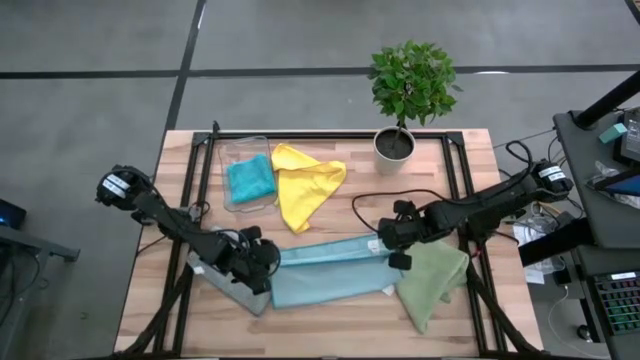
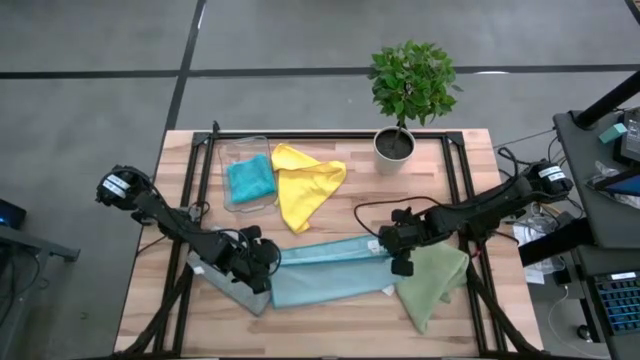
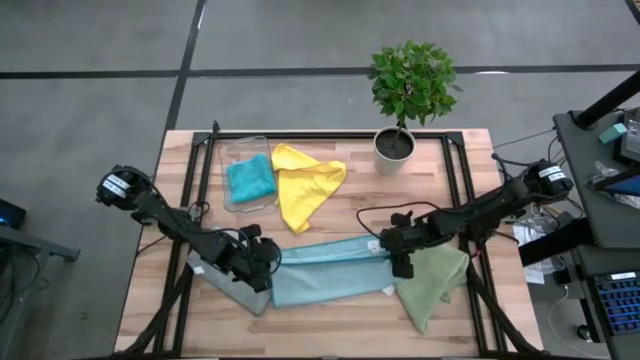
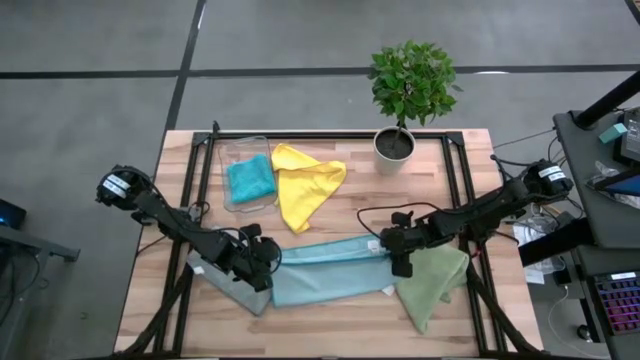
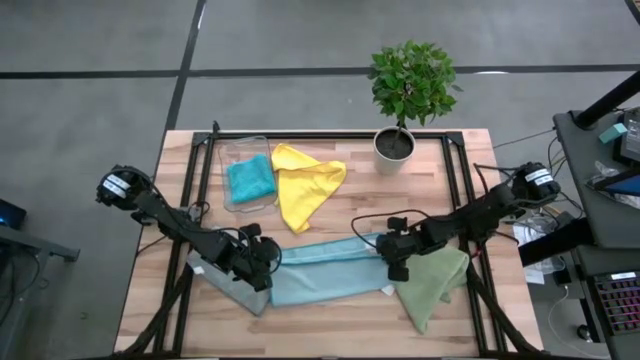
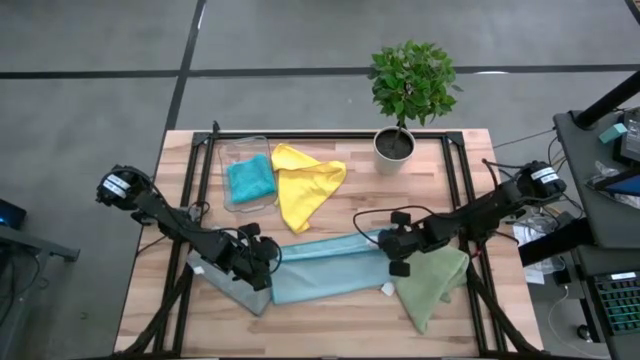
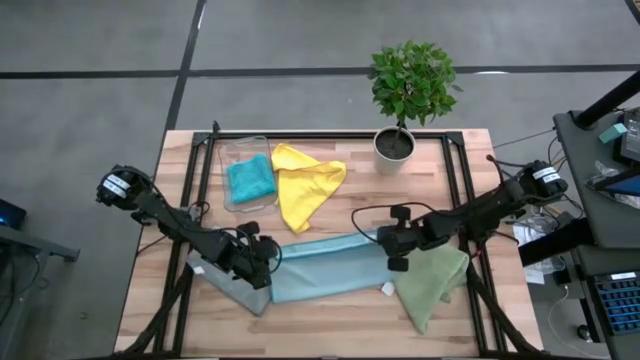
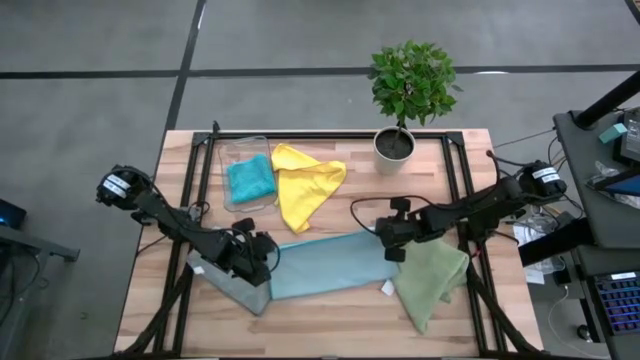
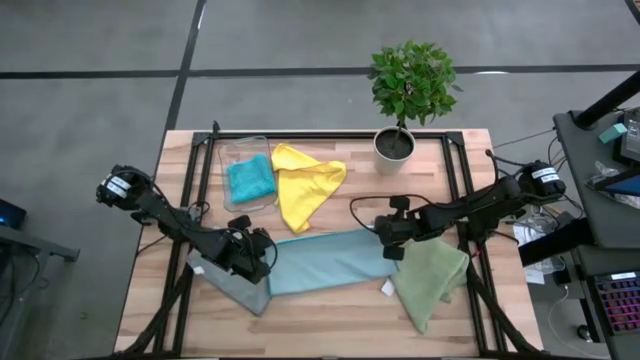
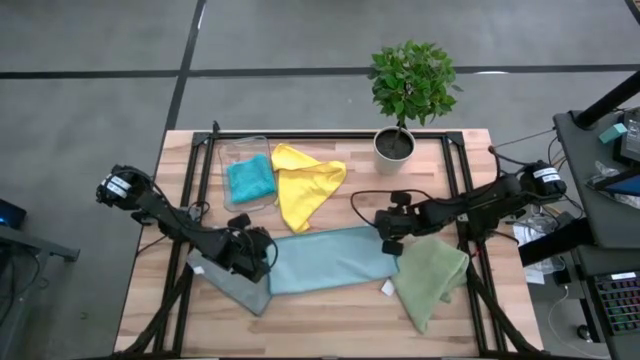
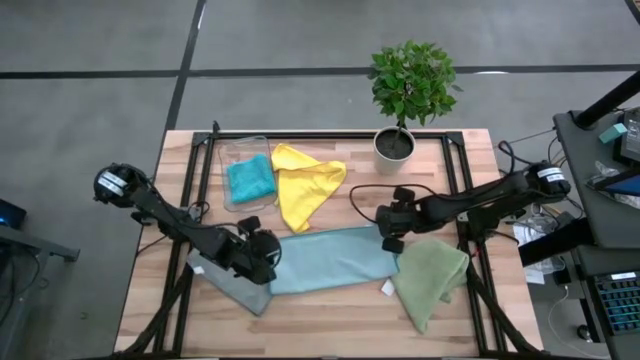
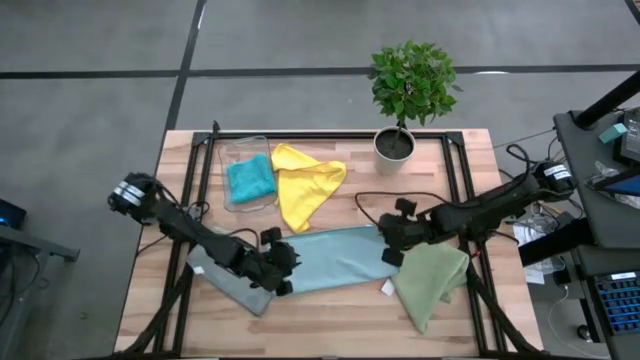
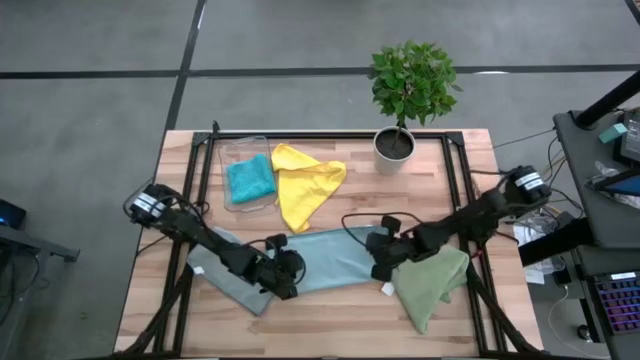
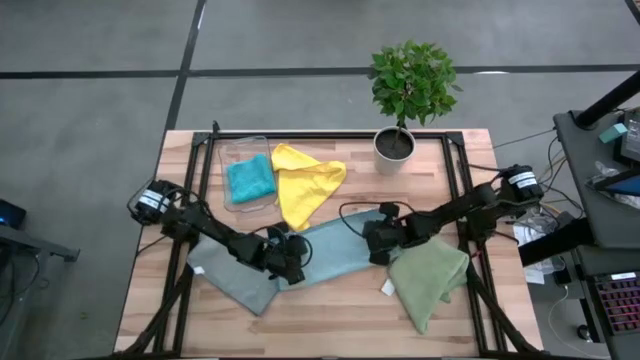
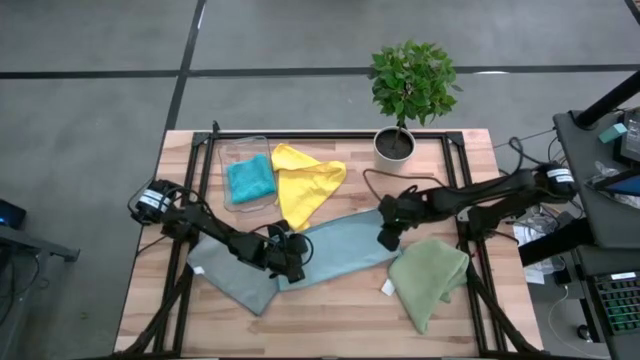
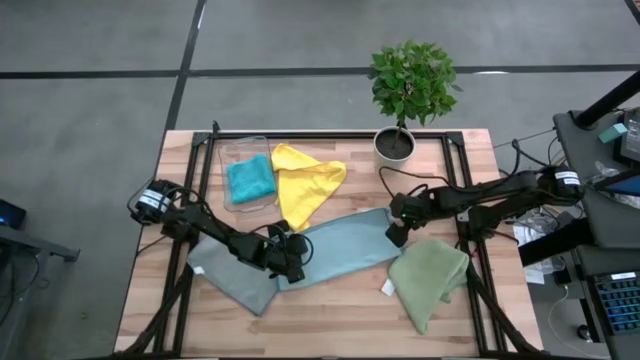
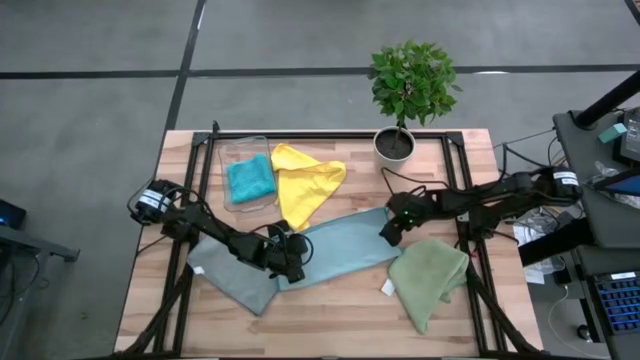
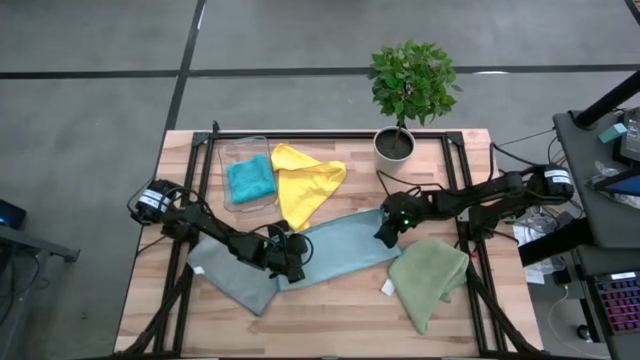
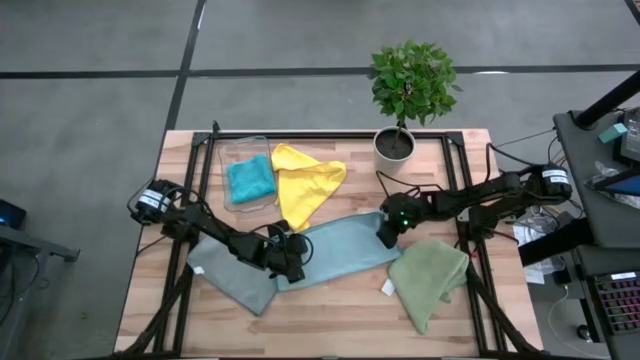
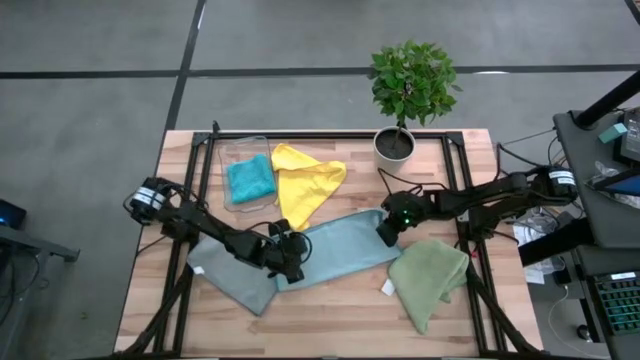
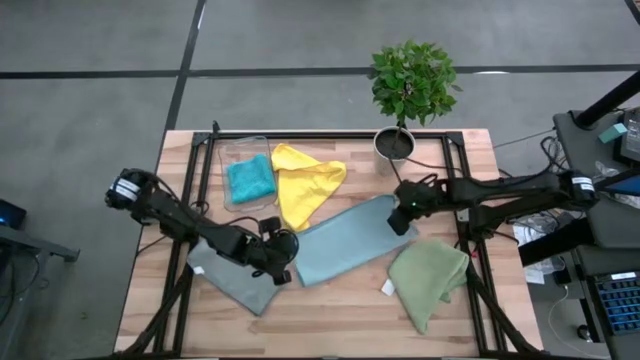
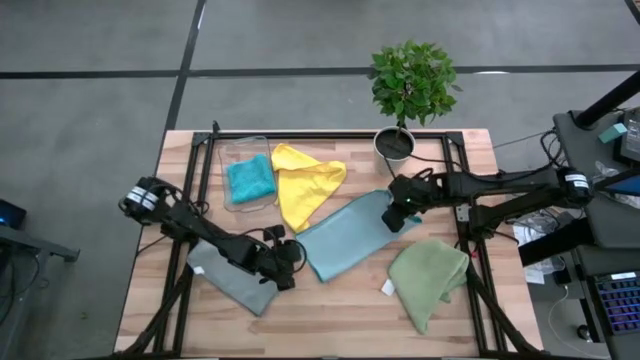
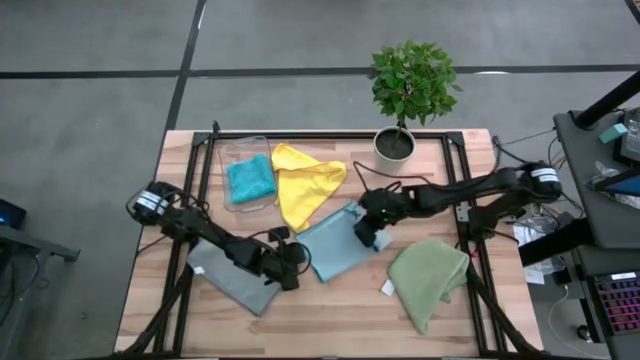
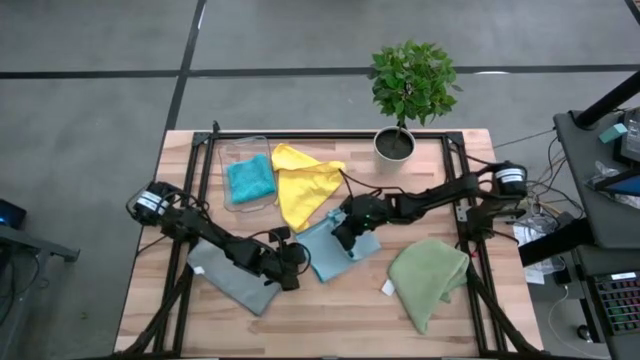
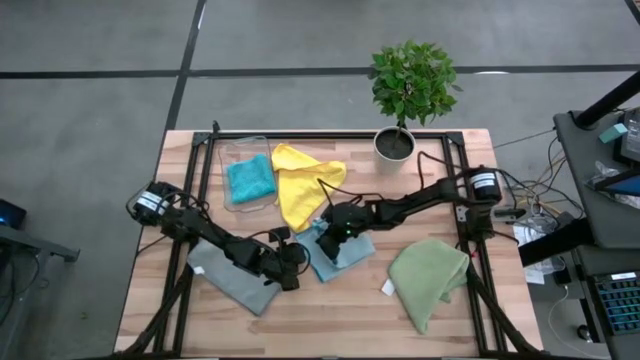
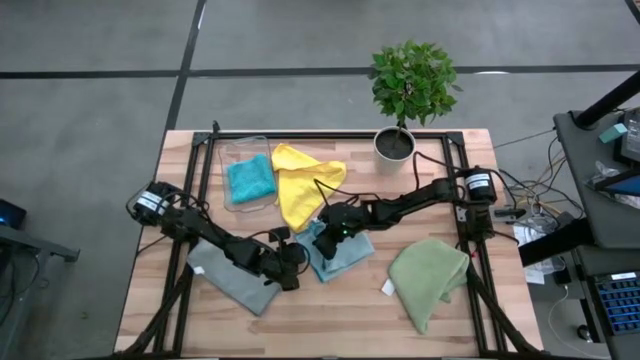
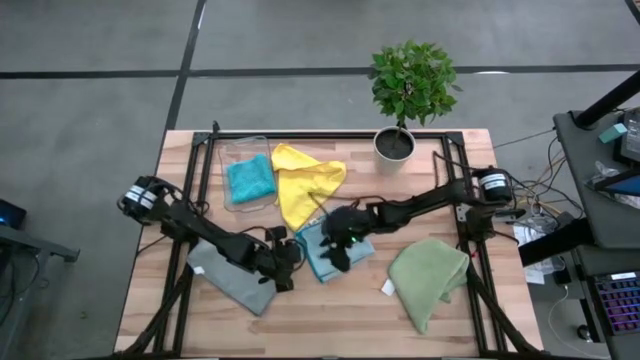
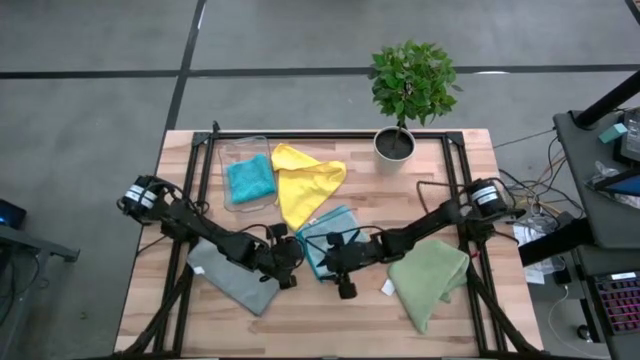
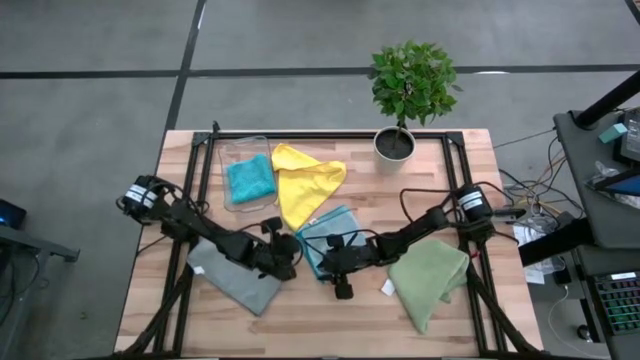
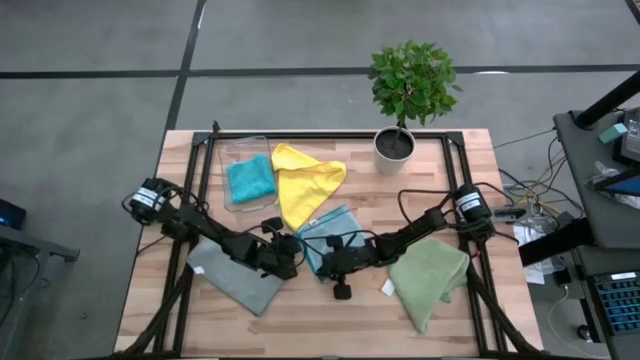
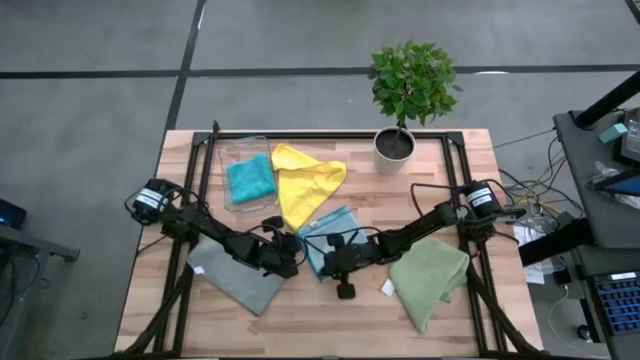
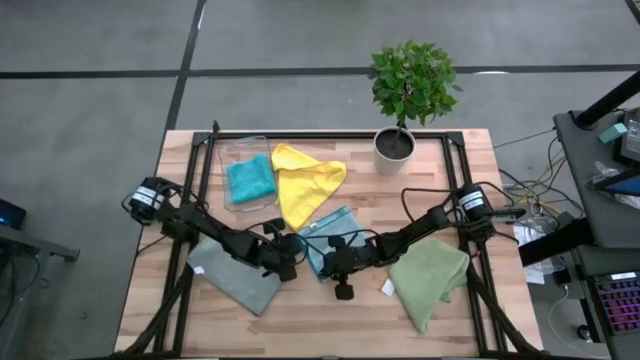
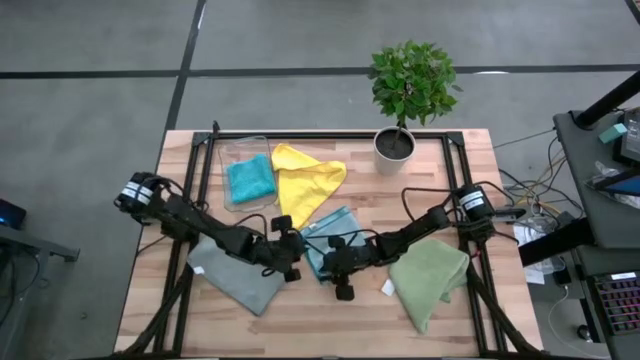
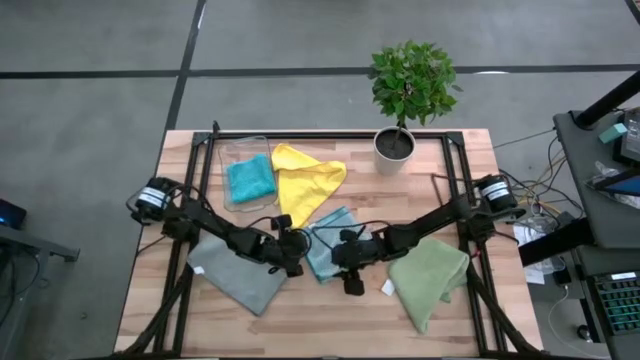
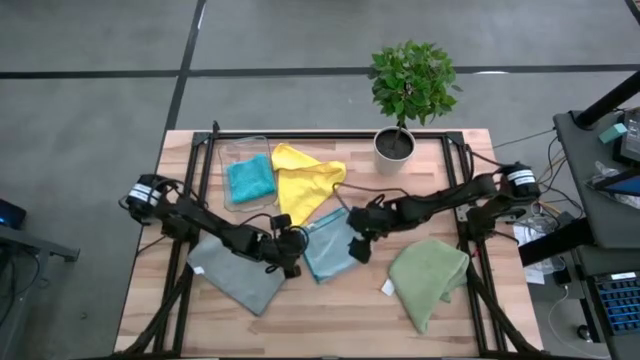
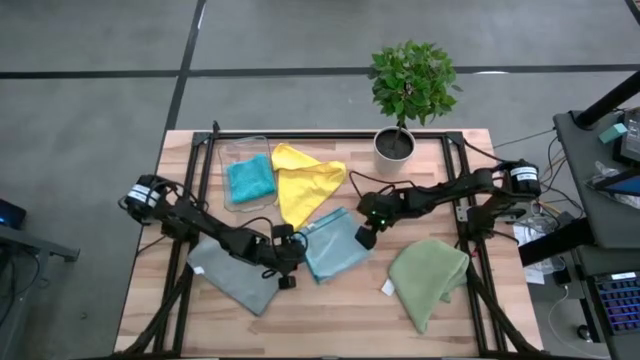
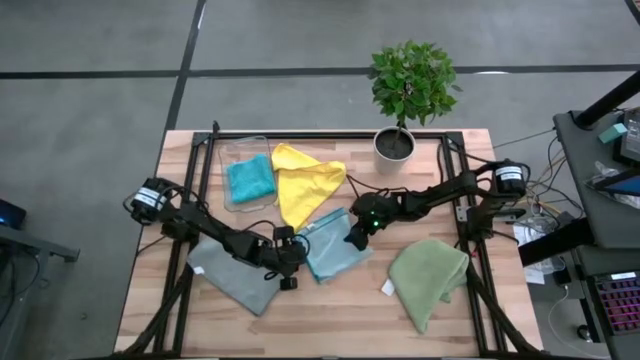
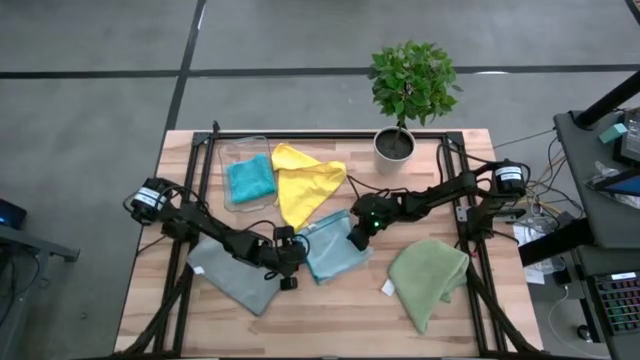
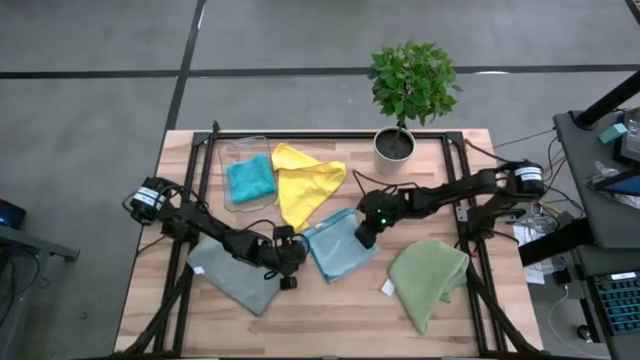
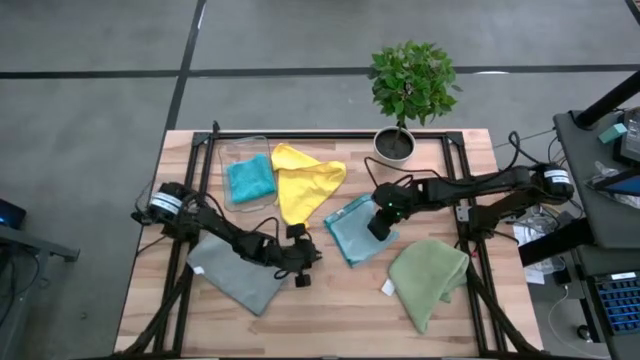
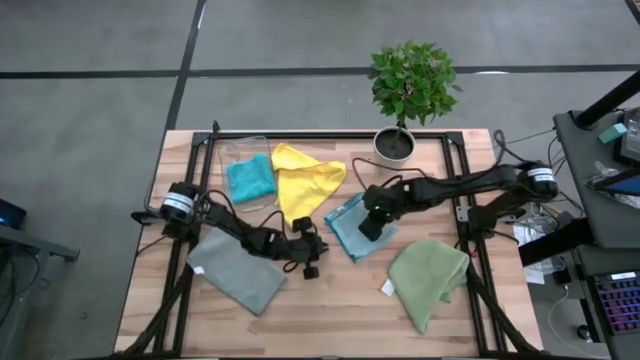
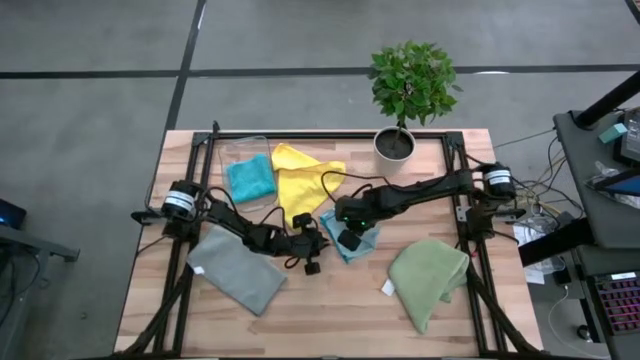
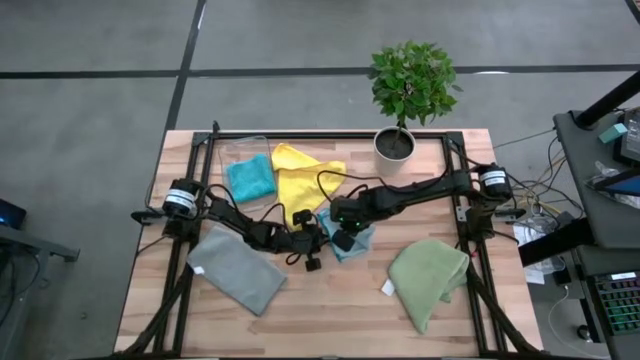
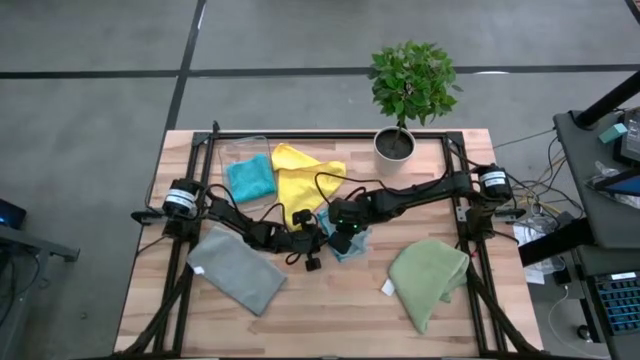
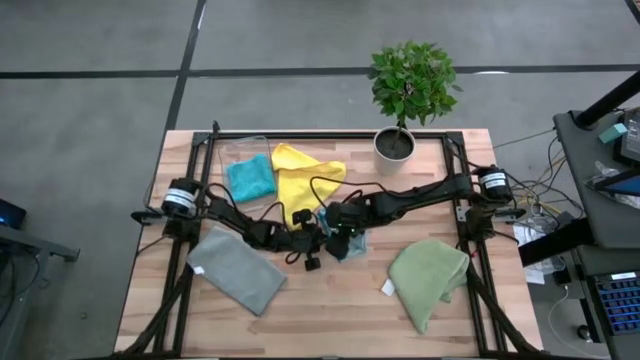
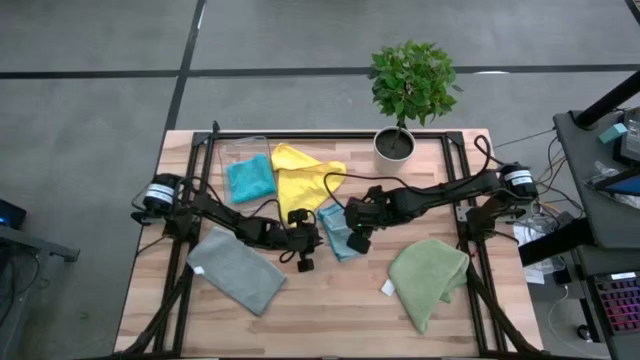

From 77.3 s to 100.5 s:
Task: Fold microfiber towels
Fold the light blue microfiber towel
